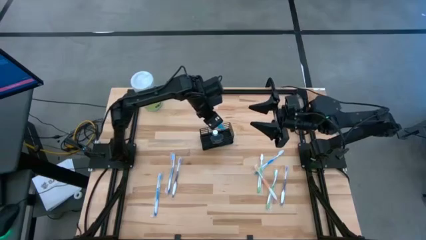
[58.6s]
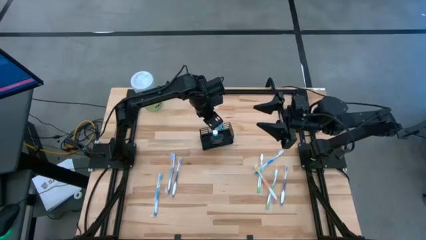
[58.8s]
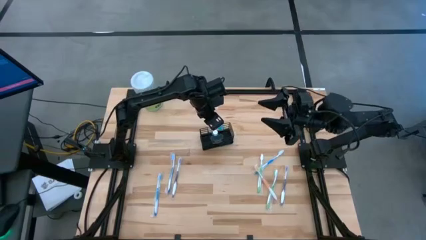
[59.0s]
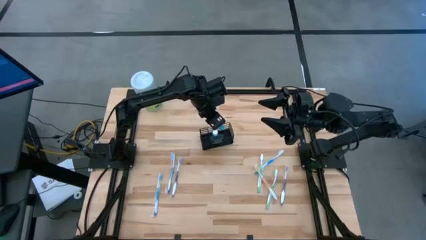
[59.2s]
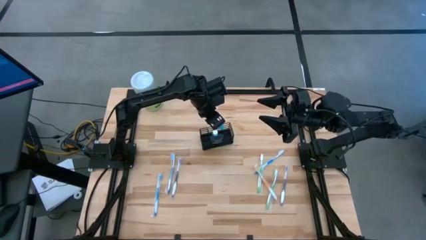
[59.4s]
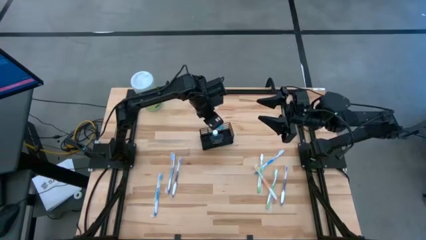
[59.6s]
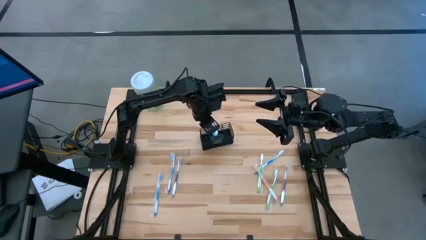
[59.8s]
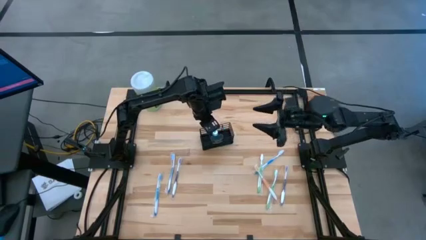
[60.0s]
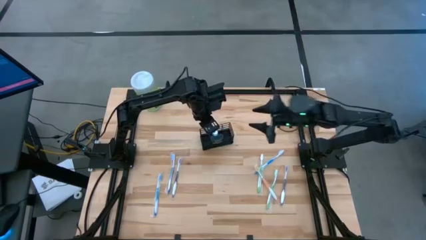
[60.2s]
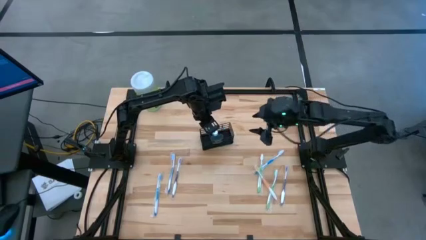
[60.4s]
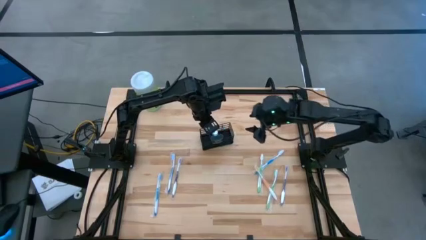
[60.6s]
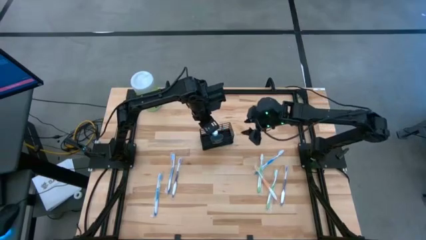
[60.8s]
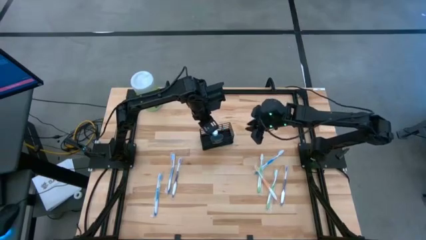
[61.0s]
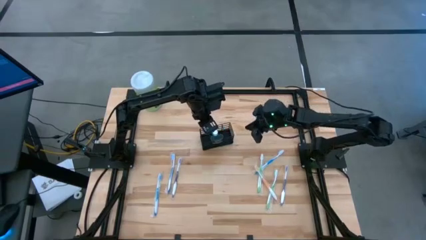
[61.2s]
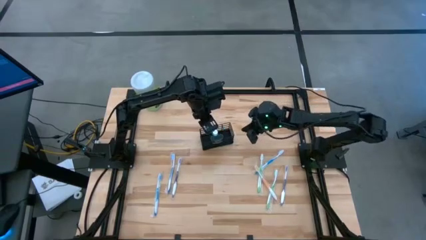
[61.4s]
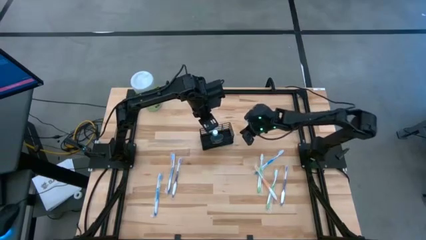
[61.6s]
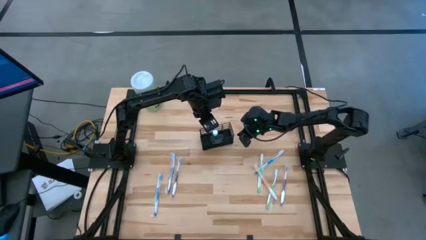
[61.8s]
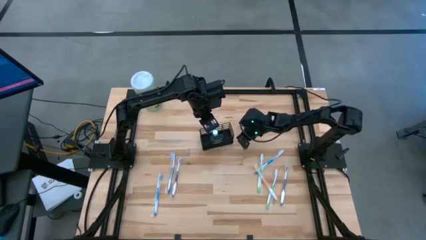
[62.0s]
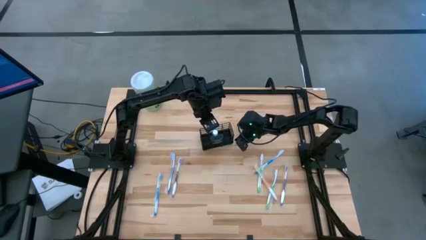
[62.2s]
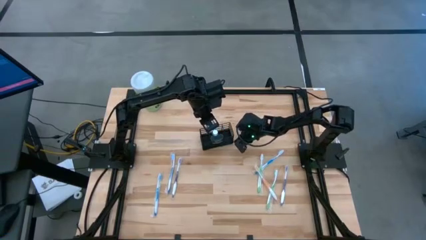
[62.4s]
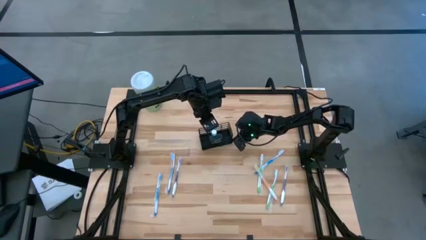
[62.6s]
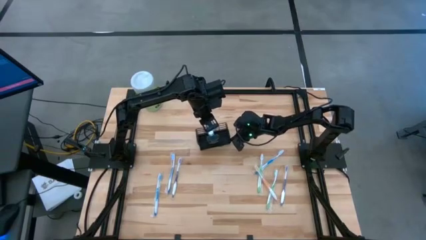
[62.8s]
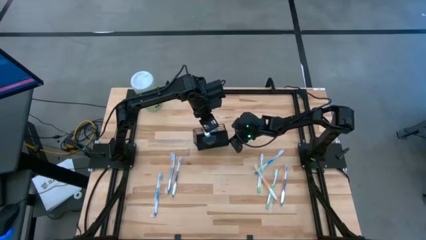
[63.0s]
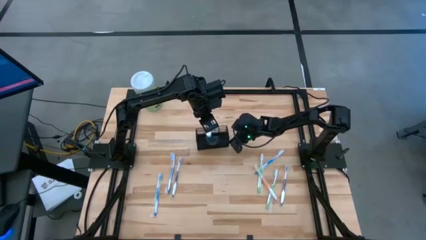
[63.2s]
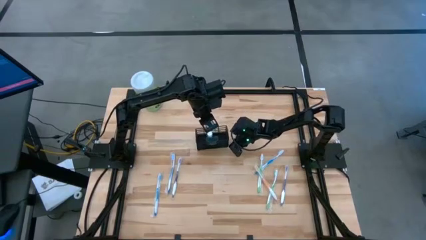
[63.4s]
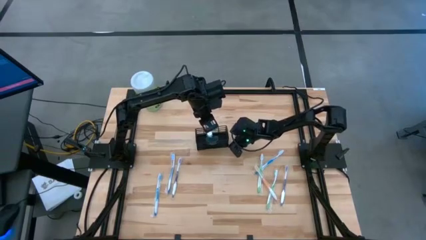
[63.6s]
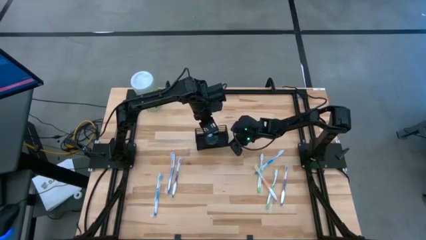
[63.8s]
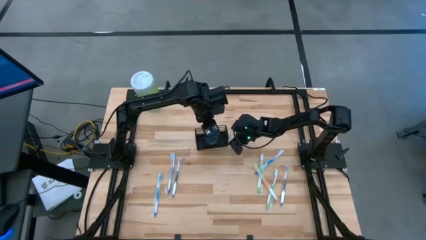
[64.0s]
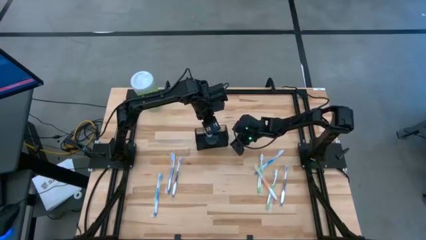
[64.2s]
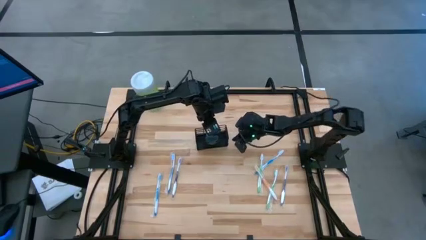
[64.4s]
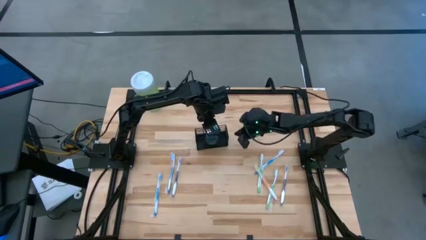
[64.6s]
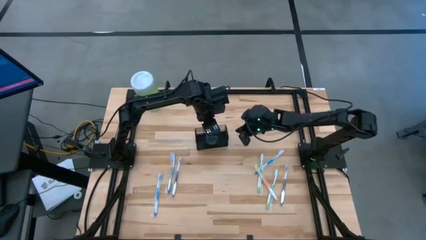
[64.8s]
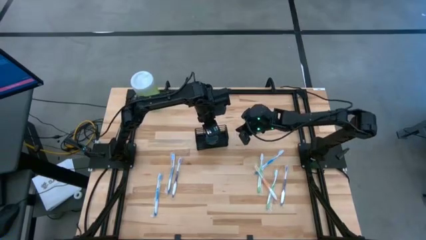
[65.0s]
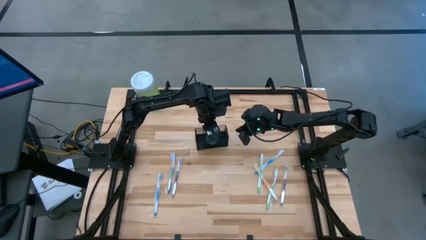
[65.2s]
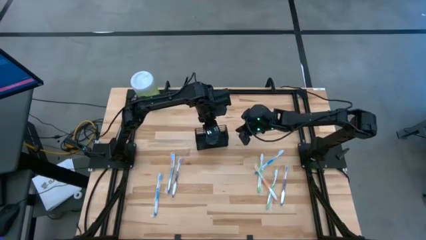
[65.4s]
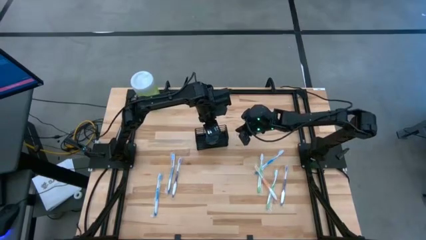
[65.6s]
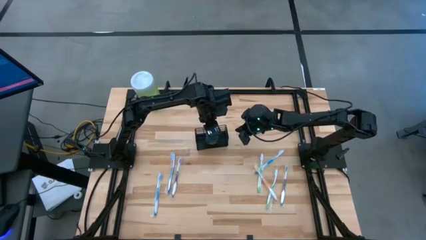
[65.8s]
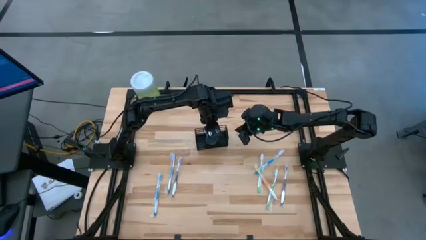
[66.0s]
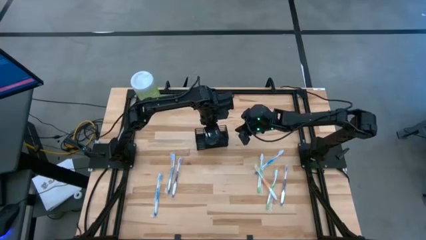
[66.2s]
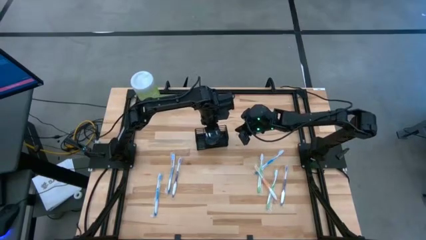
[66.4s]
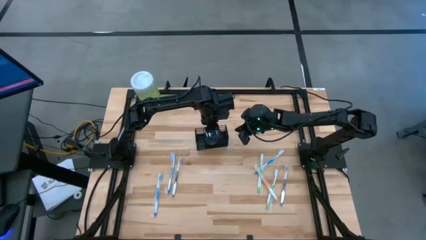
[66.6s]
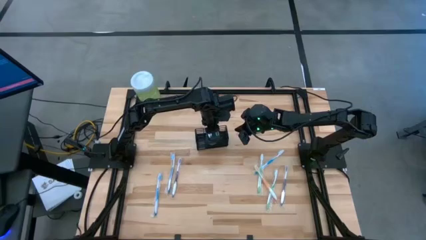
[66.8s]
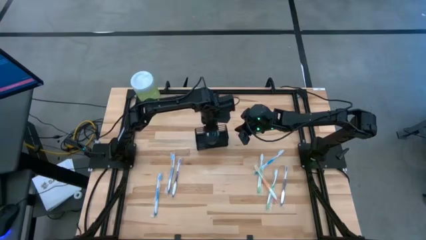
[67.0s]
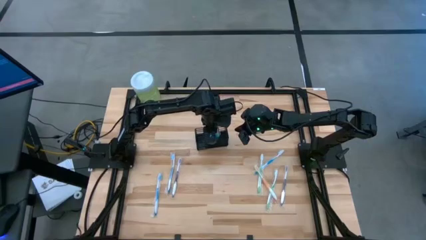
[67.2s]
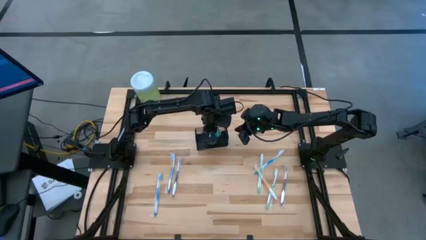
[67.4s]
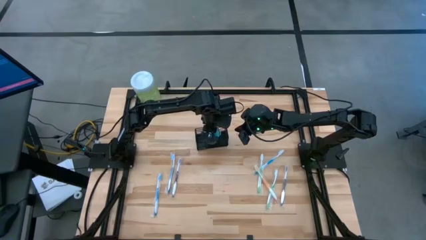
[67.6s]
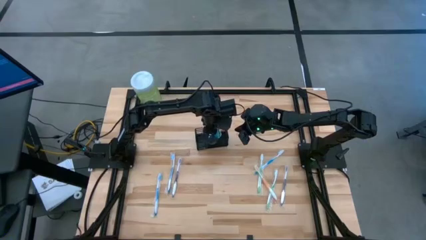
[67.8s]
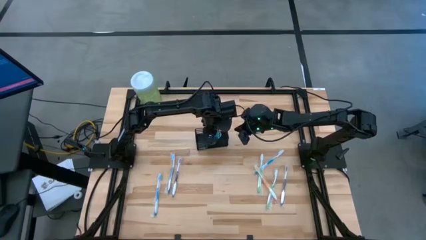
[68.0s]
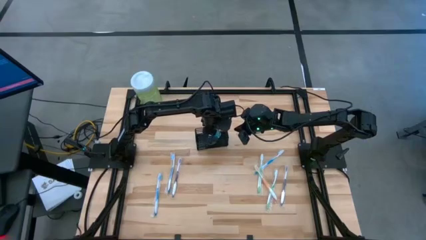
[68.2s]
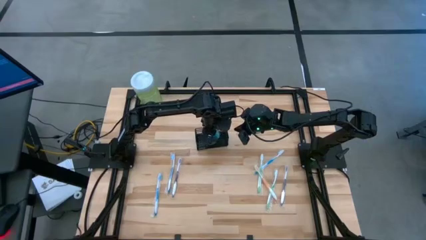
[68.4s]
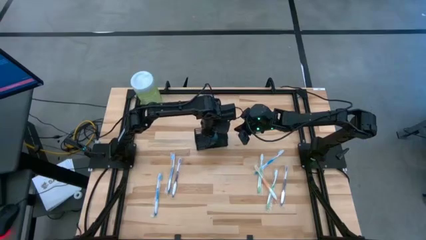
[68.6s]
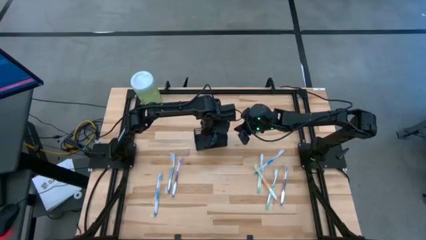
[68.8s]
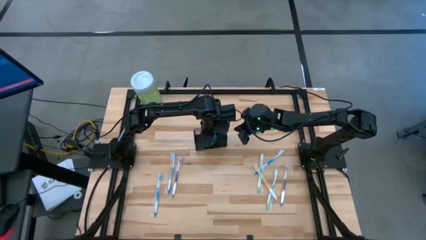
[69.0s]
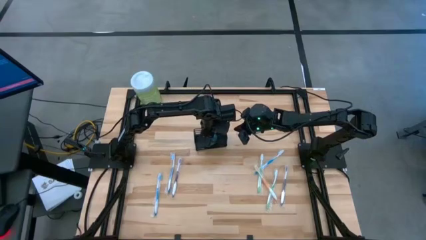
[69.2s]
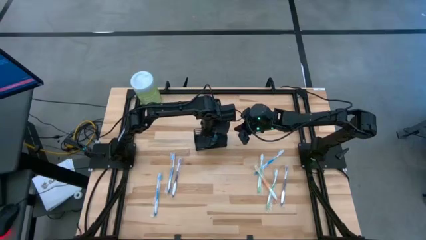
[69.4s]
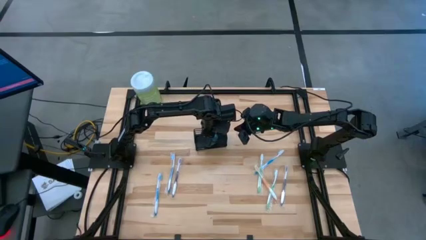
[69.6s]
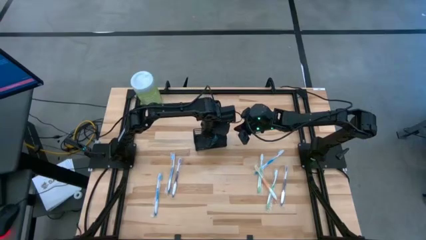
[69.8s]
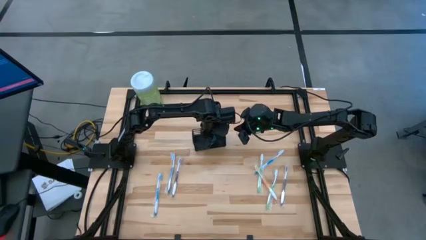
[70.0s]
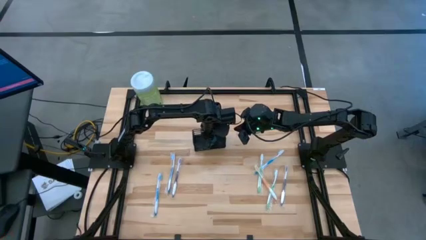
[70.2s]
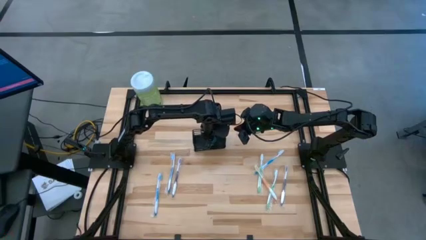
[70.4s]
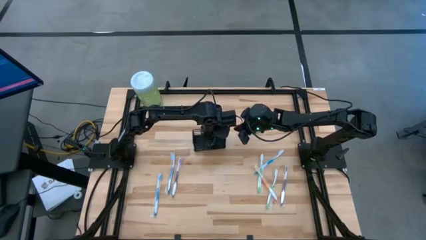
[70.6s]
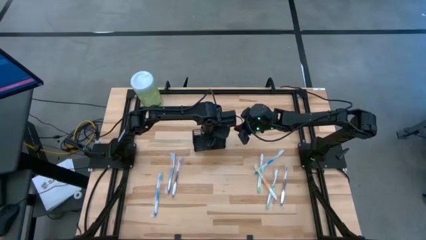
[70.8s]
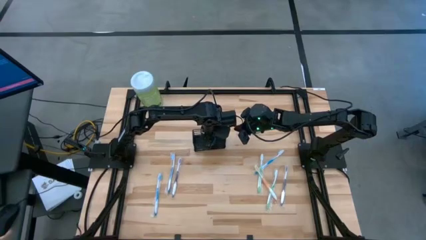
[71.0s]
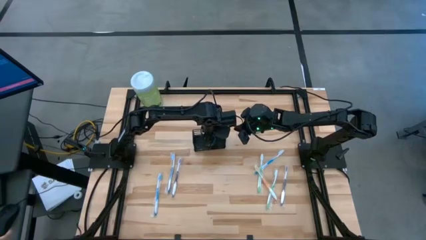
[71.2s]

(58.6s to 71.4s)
Task: Pick & Place toothbrushing station
Put the blue mouthwash into the black mesh organizer

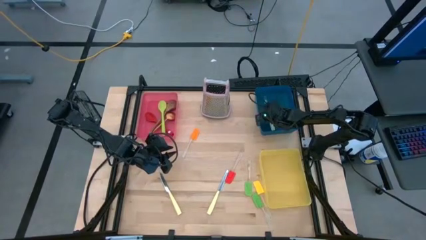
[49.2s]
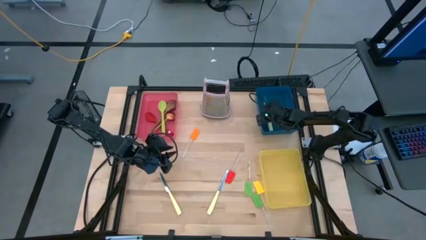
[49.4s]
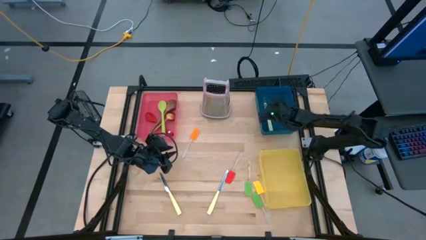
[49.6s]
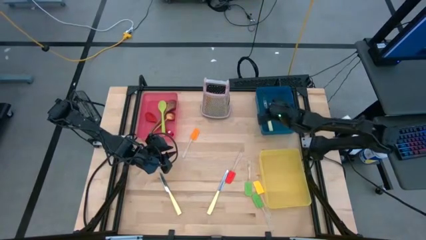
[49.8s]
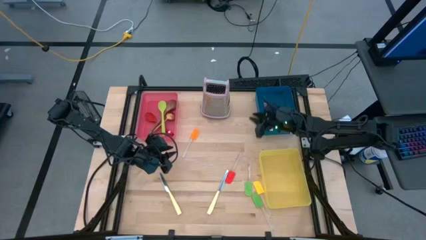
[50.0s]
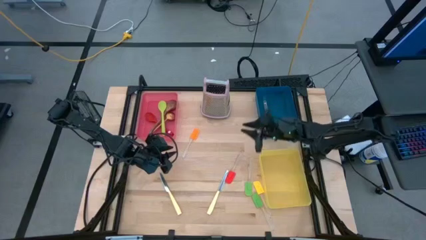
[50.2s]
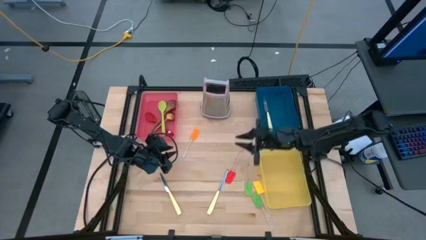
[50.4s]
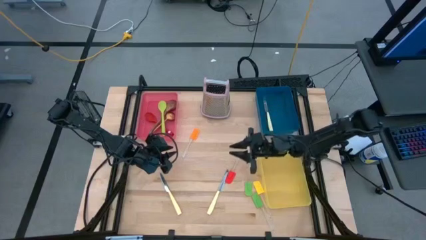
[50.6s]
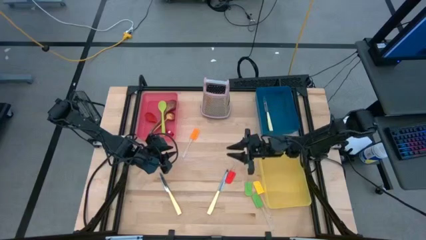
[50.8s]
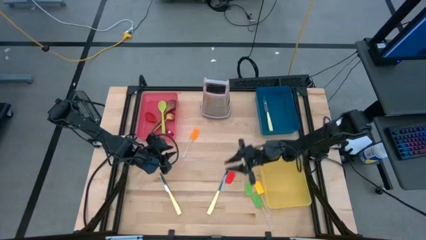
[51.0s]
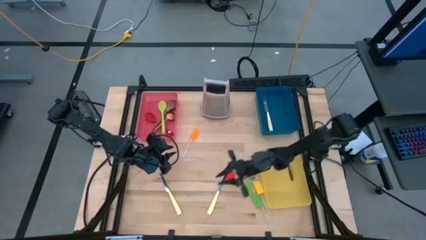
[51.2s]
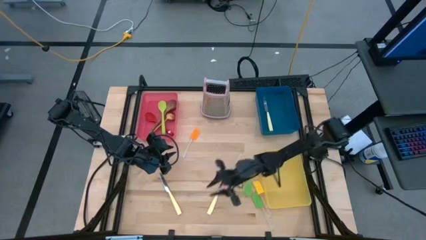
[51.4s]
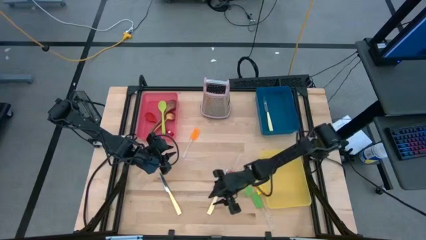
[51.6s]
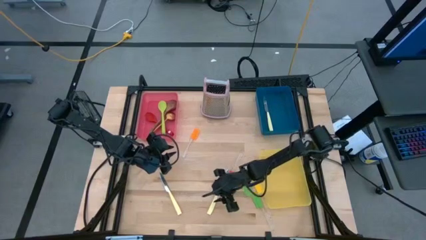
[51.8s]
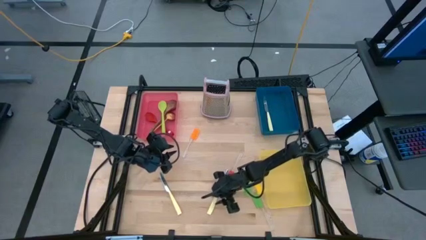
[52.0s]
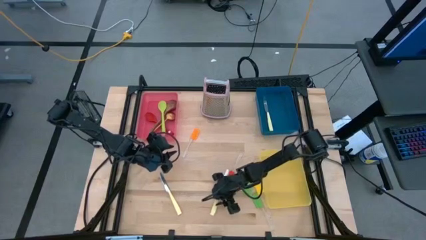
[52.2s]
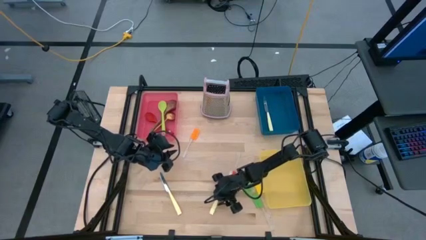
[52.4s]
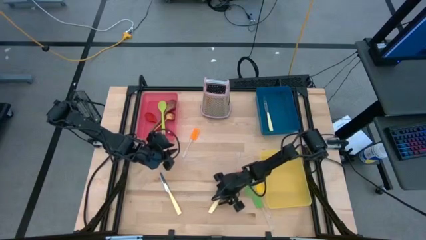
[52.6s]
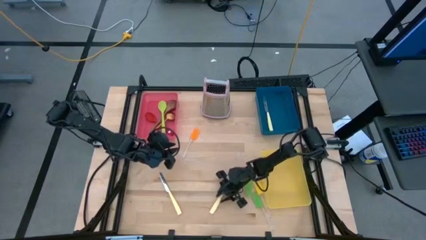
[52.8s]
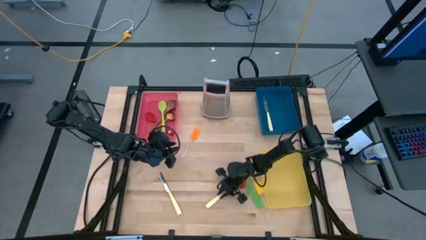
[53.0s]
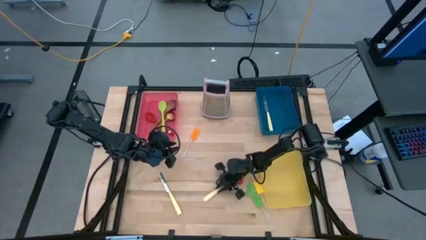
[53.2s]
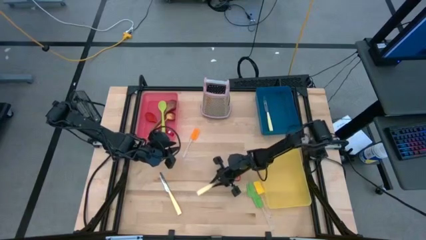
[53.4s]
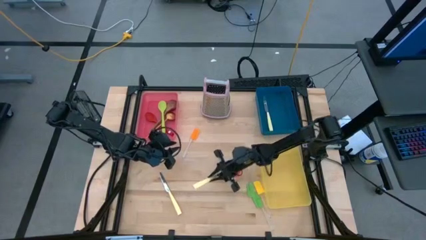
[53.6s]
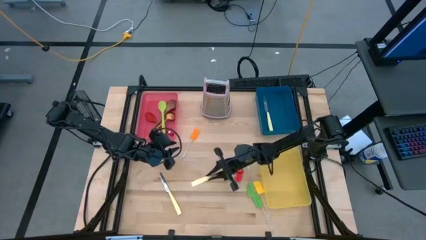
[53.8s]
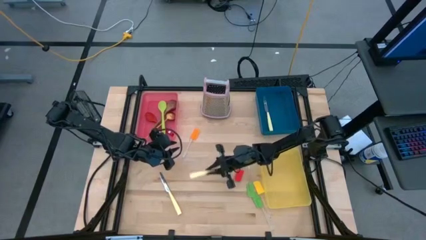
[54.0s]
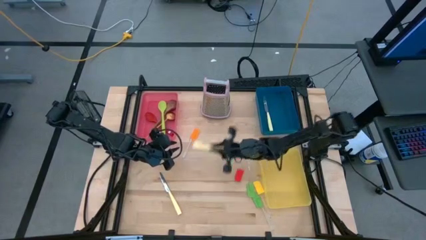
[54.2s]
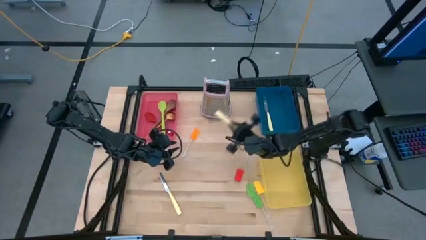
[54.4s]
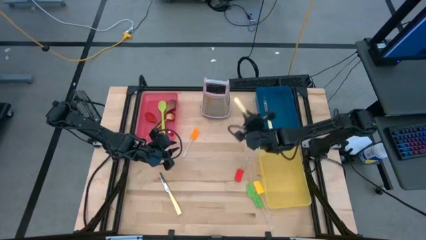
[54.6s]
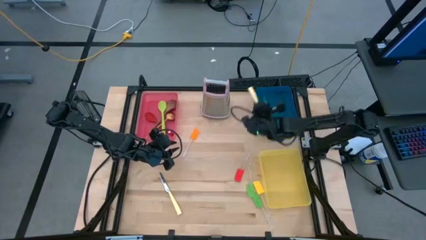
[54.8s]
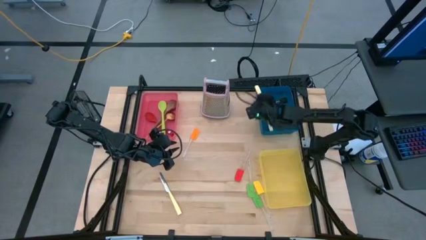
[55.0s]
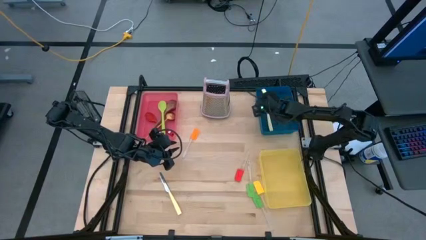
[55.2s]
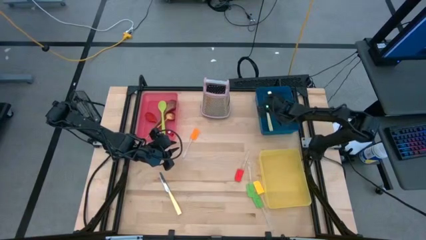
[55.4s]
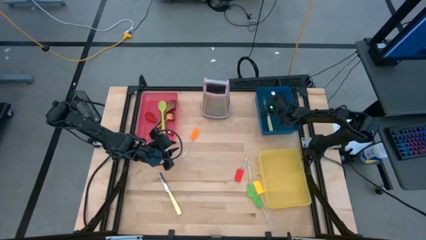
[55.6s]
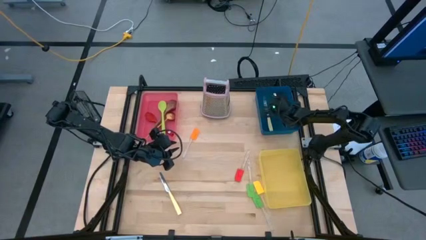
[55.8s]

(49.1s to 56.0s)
Task: Pick & Place Kitchen Items
Put the right yellow knife into the blue bin
